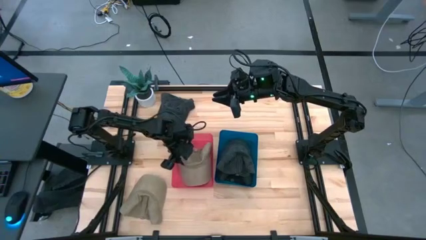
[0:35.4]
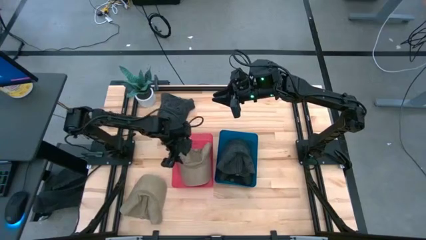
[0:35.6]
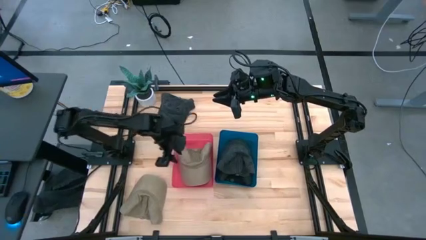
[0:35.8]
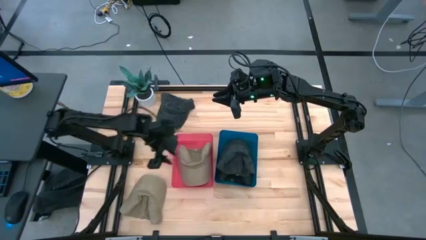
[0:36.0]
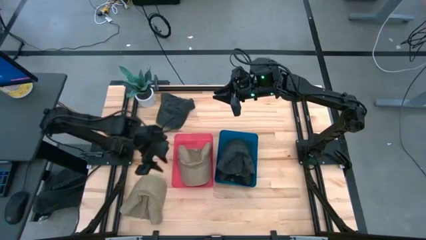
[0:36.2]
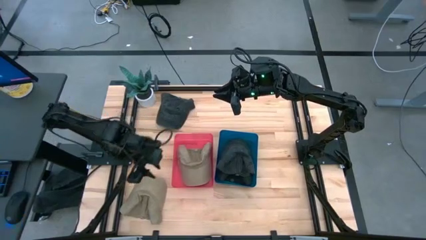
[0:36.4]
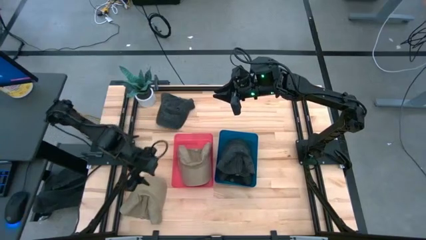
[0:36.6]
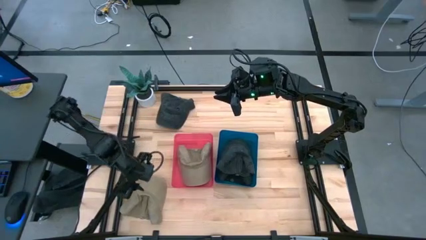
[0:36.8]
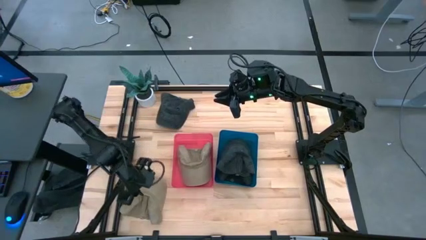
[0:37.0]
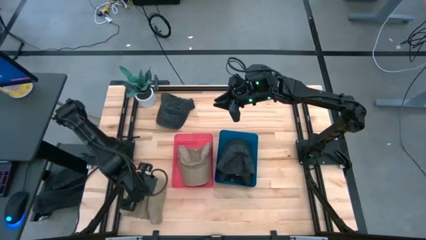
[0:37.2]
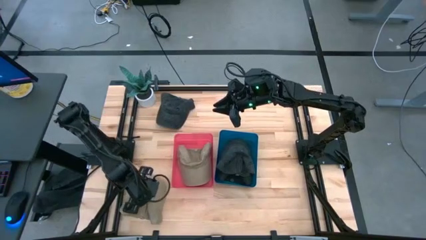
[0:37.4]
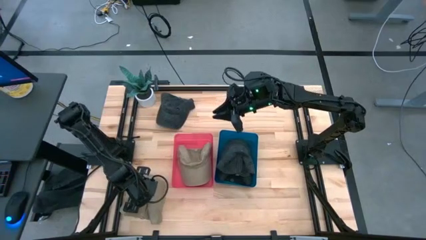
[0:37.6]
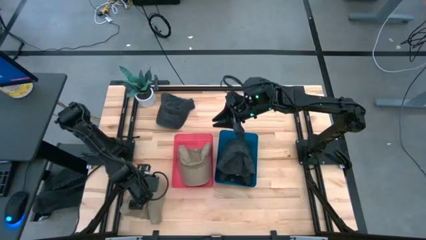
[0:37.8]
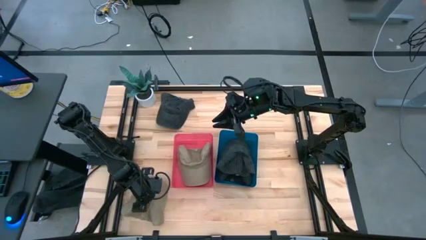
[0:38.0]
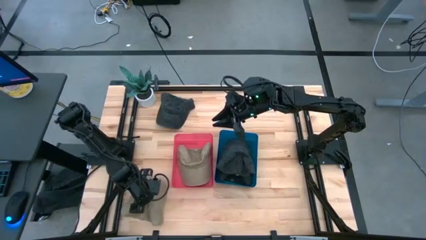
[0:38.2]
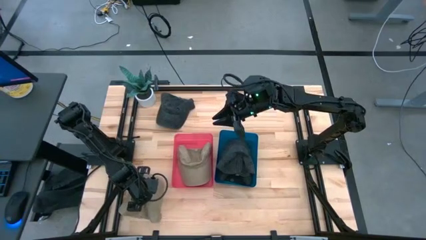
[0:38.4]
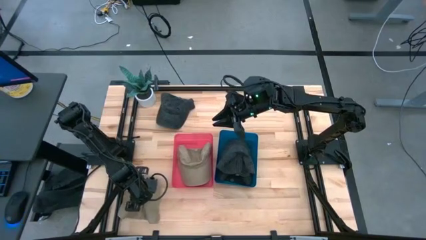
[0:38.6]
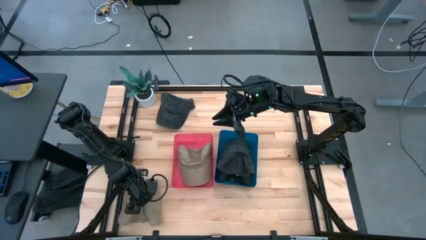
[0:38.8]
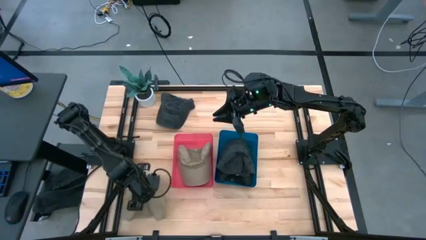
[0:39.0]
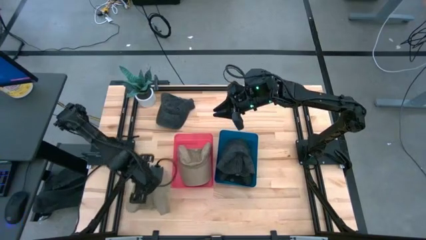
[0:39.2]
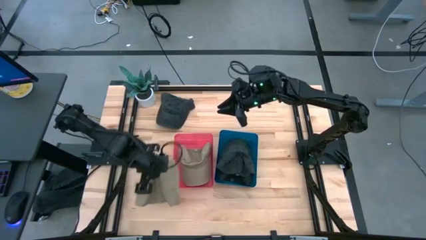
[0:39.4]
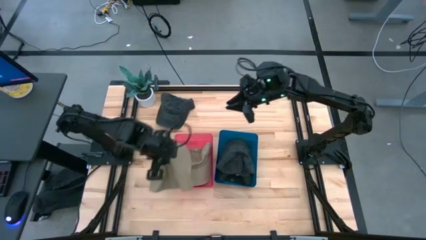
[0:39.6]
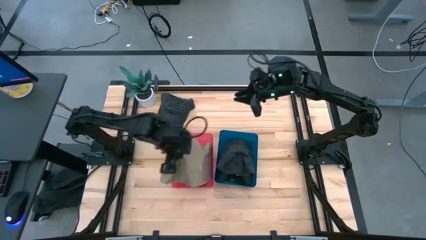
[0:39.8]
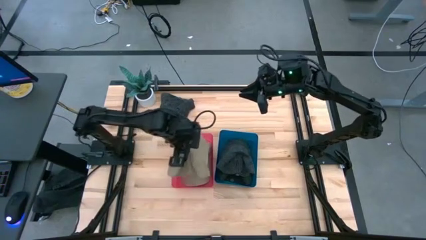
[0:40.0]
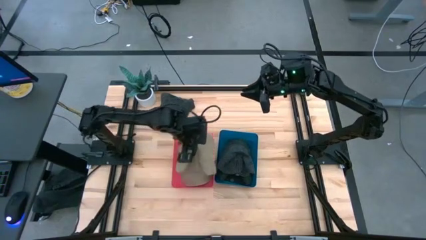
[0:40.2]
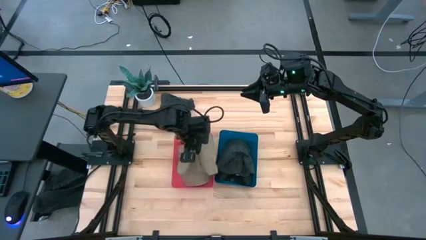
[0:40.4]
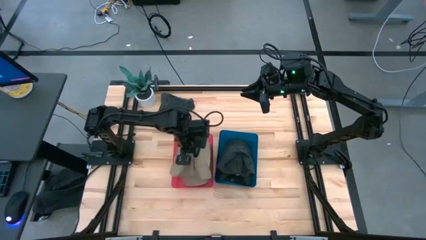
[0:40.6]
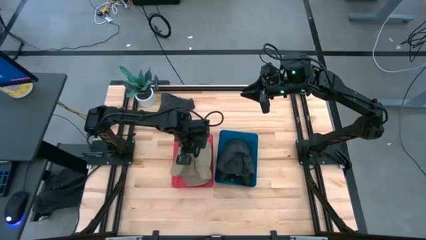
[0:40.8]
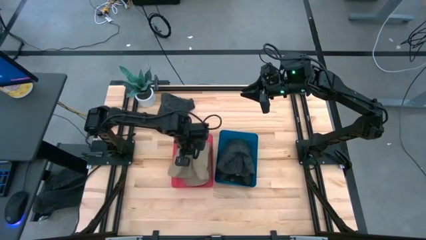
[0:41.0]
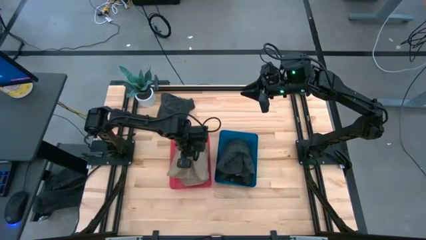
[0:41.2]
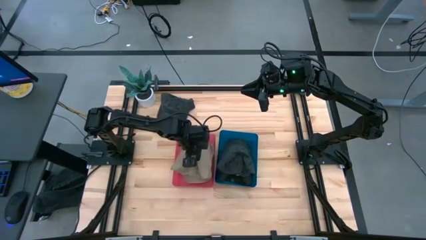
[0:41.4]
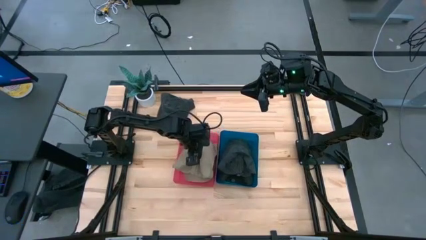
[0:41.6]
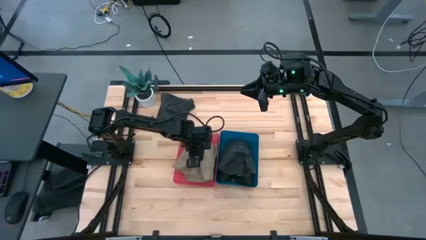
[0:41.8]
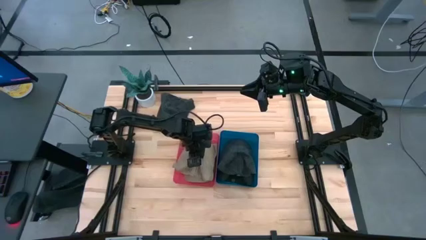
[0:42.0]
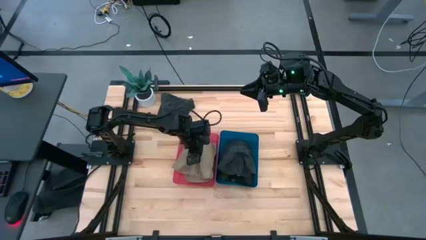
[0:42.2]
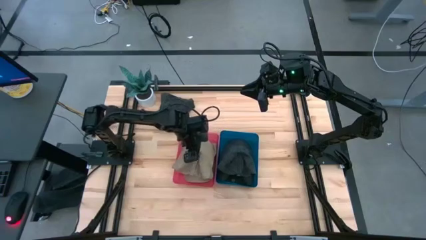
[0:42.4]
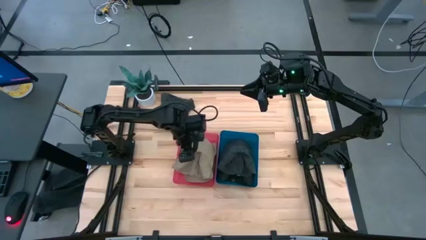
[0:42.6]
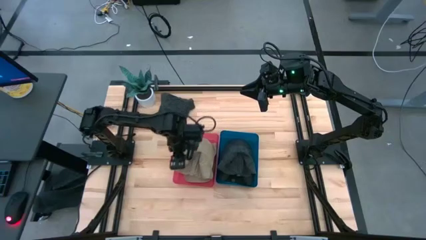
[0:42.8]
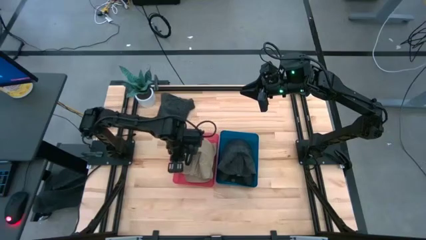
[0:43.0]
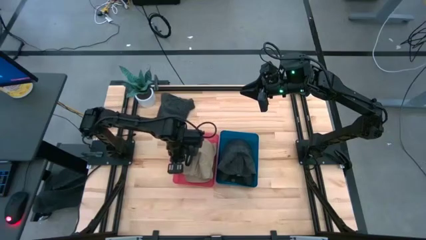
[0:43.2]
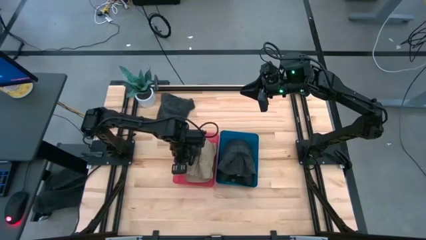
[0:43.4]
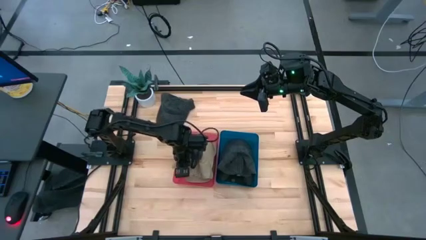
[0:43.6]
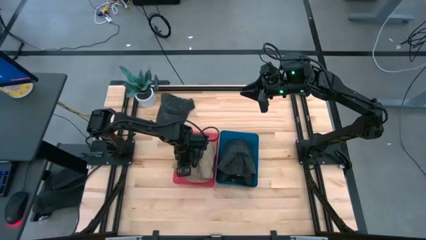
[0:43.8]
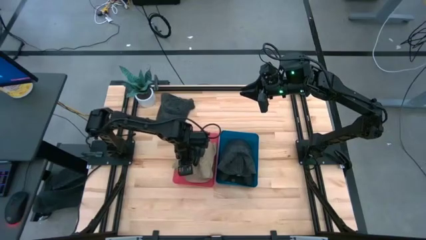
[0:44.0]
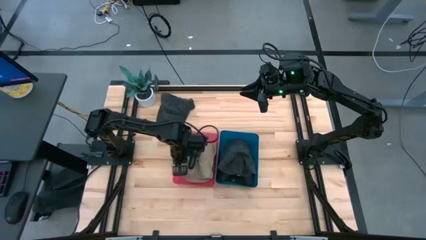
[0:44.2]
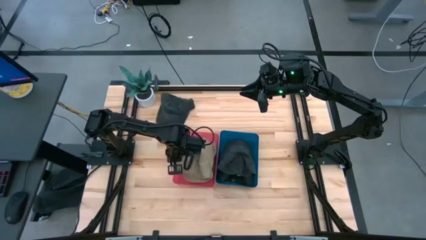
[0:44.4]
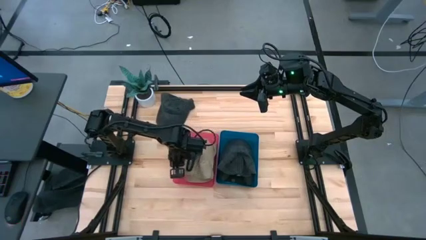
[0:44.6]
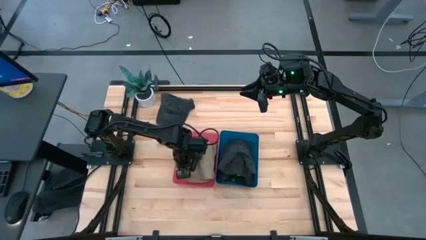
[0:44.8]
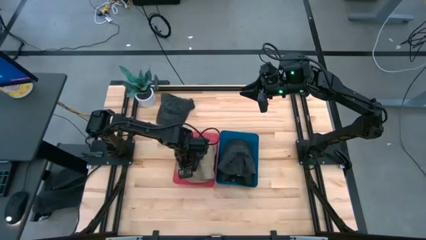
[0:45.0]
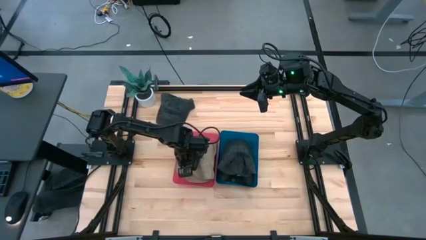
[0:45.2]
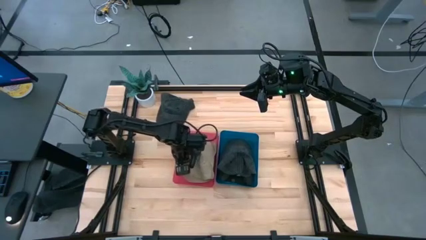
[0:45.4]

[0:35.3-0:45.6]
Task: Pick & Place hat
Put the brown cap into the red bin

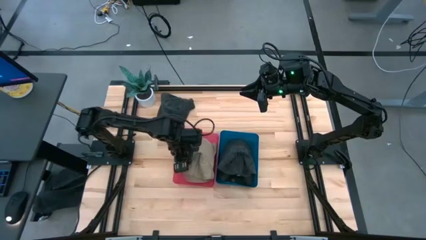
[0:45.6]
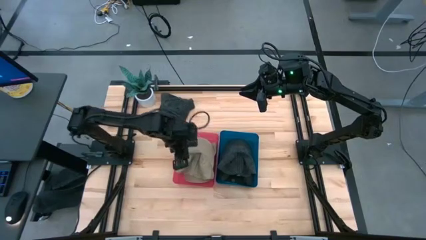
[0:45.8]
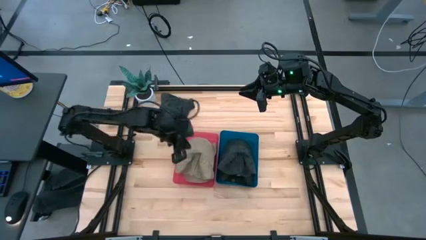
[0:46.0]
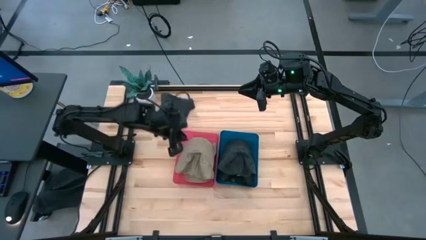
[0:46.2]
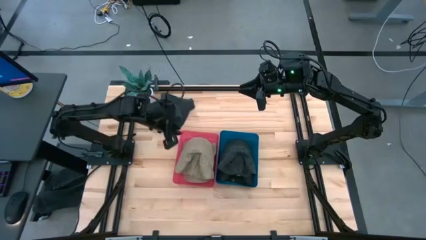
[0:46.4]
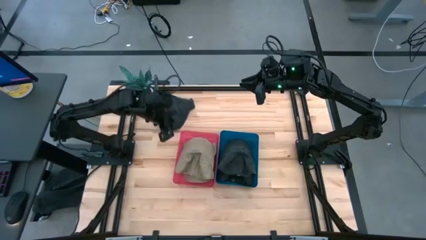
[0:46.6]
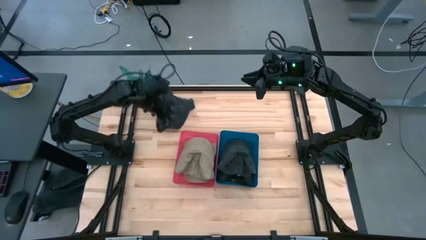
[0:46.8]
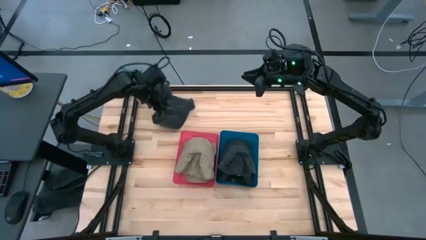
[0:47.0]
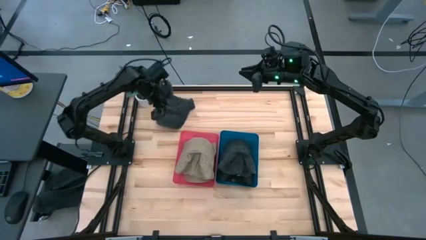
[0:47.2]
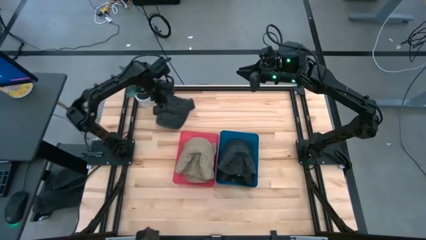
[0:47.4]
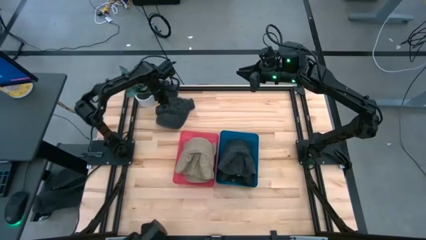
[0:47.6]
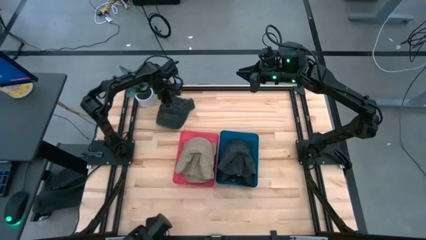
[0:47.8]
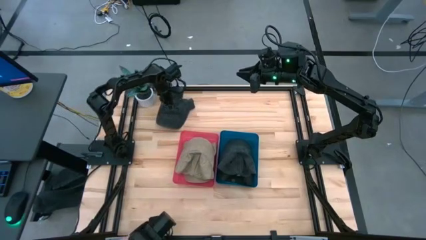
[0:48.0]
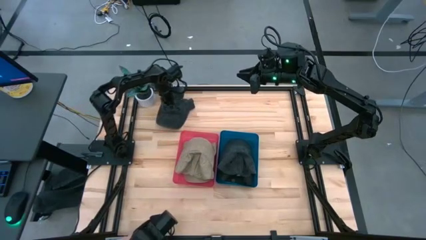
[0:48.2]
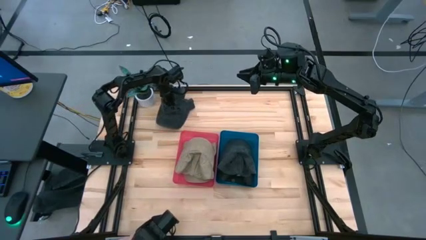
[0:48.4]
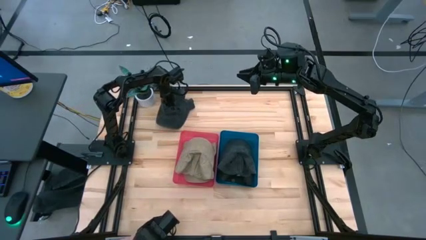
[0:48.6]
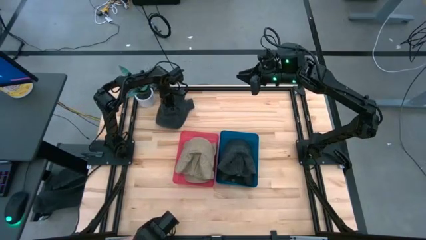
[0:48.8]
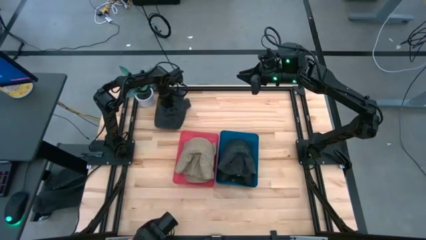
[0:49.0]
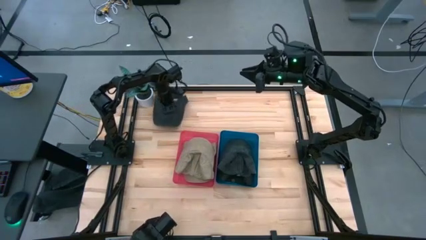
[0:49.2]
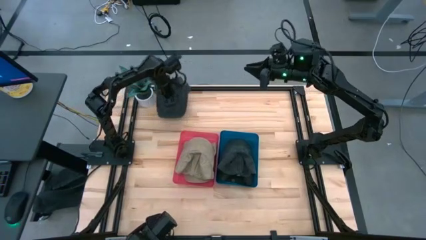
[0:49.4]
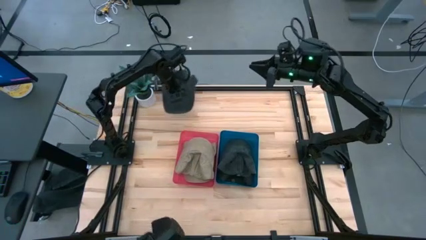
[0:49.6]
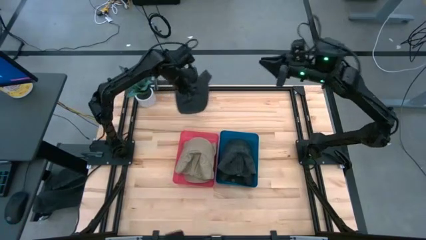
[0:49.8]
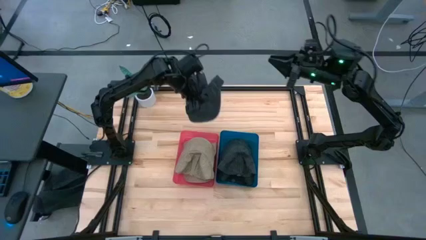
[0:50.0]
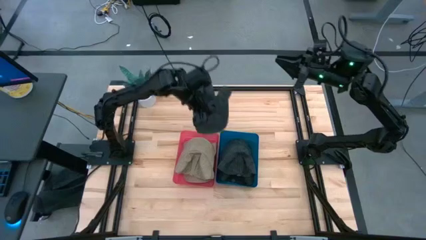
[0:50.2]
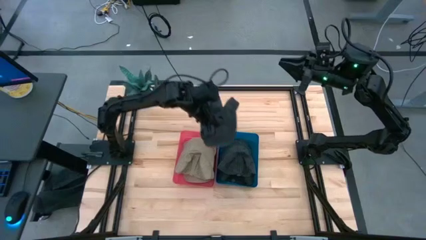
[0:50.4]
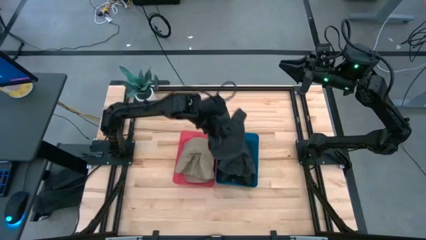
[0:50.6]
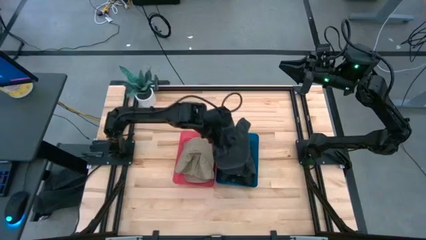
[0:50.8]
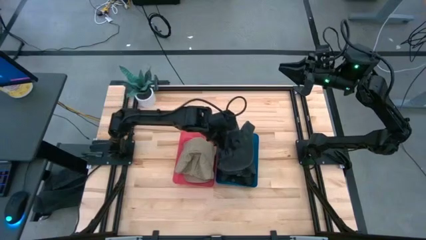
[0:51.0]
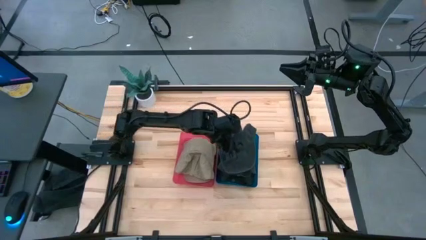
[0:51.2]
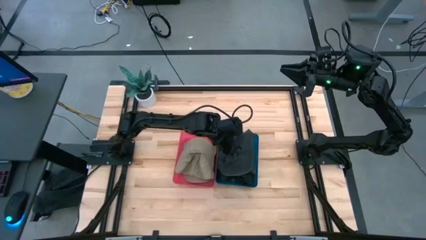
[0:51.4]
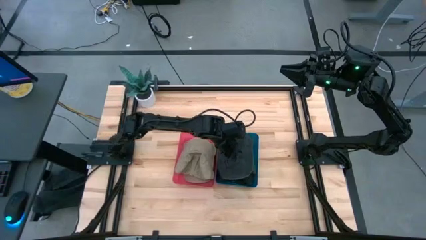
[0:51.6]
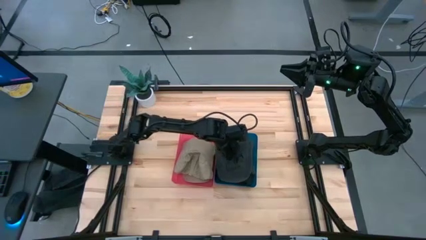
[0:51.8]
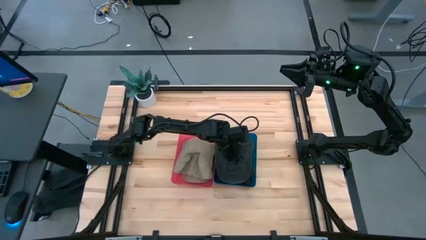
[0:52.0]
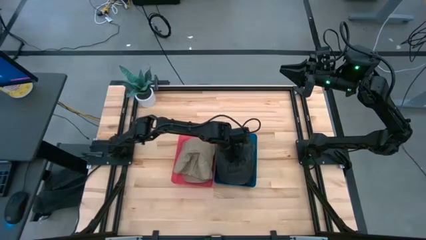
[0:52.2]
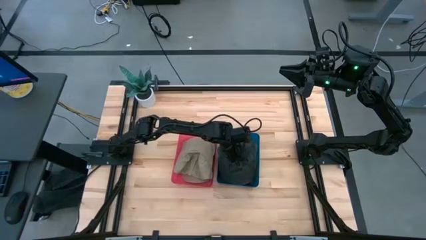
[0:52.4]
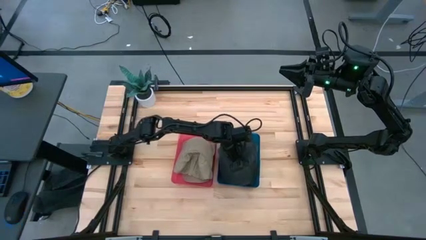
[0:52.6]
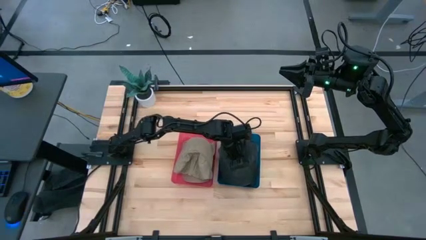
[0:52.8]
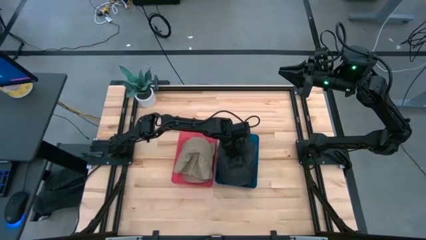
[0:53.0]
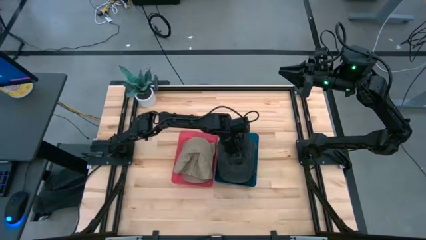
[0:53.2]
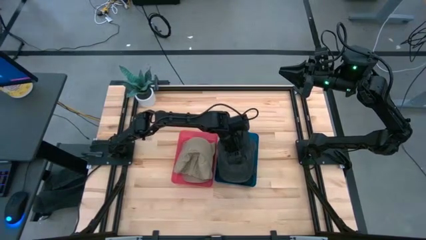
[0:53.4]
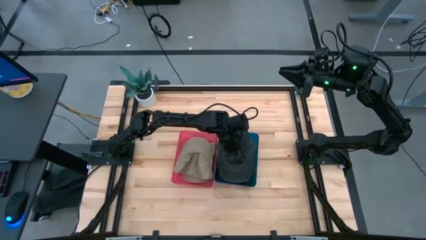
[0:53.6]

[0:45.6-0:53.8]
Put the black cap into the blue bin
